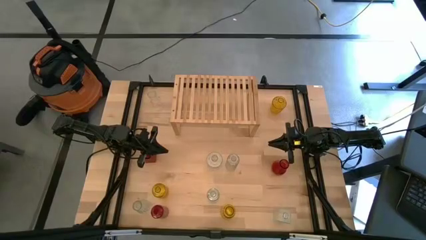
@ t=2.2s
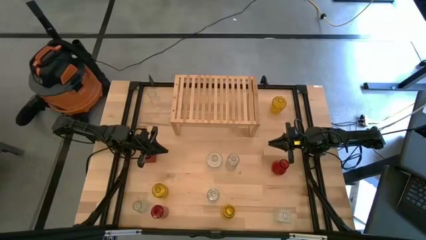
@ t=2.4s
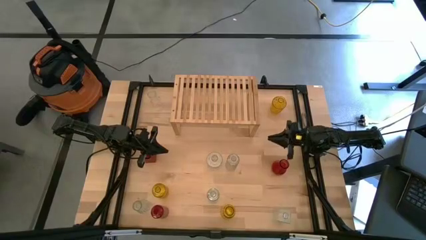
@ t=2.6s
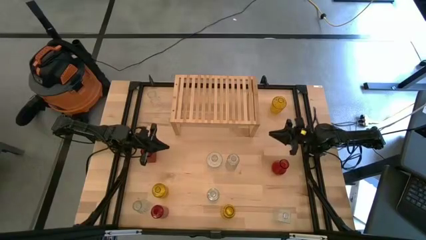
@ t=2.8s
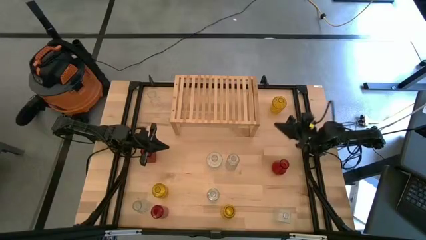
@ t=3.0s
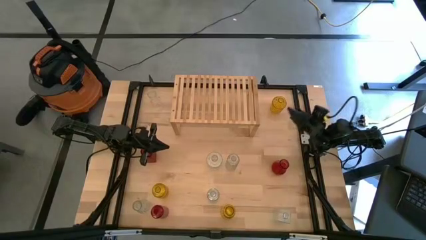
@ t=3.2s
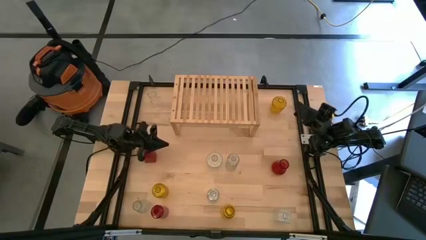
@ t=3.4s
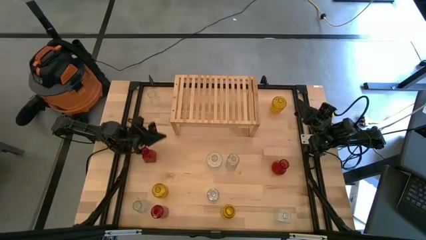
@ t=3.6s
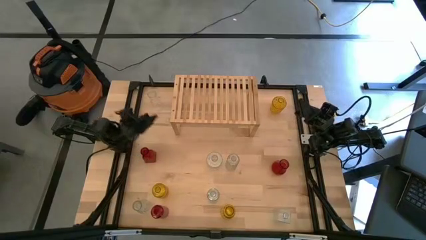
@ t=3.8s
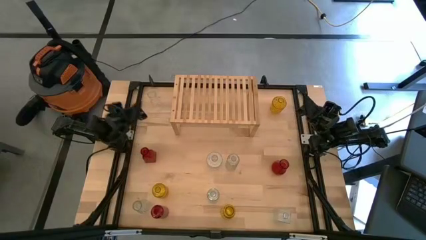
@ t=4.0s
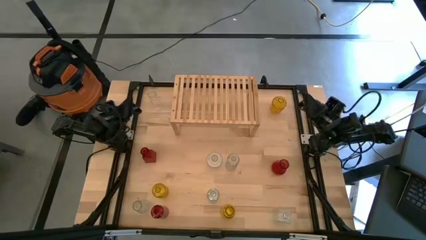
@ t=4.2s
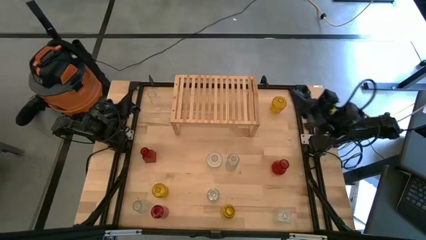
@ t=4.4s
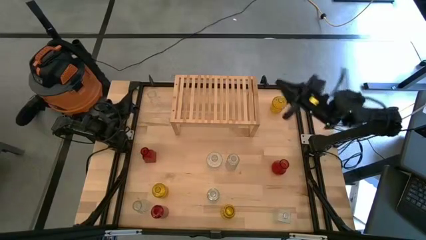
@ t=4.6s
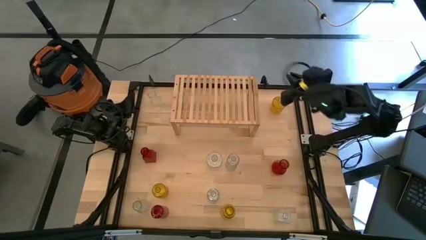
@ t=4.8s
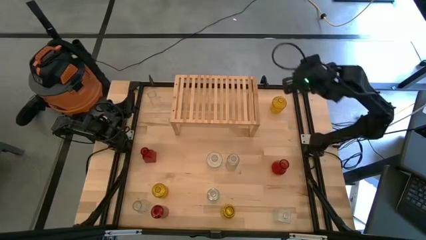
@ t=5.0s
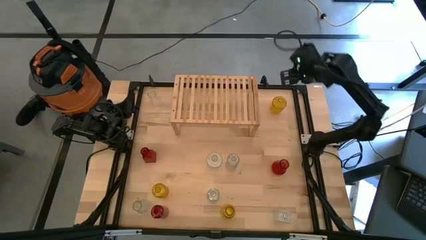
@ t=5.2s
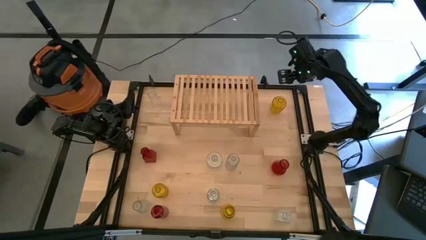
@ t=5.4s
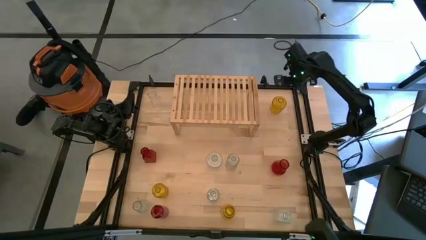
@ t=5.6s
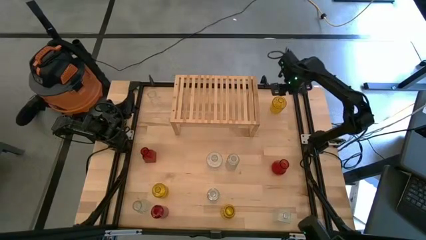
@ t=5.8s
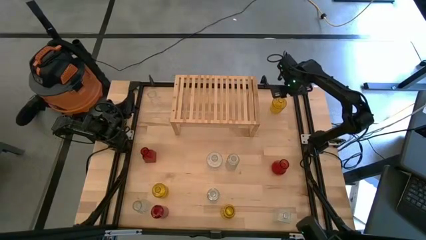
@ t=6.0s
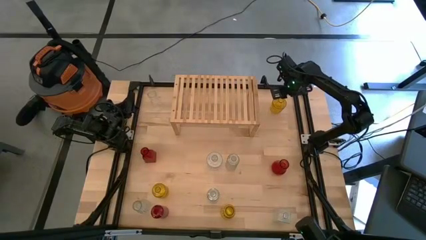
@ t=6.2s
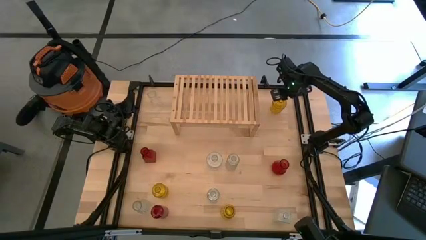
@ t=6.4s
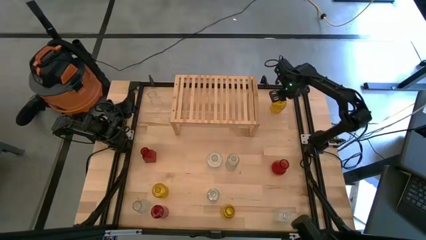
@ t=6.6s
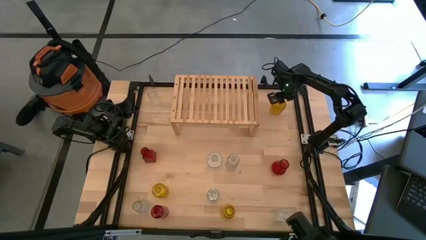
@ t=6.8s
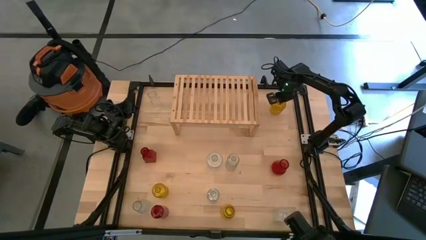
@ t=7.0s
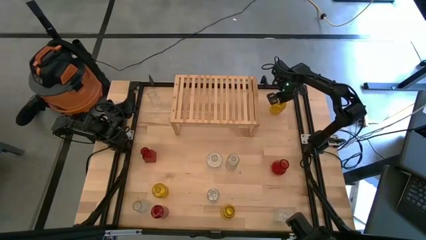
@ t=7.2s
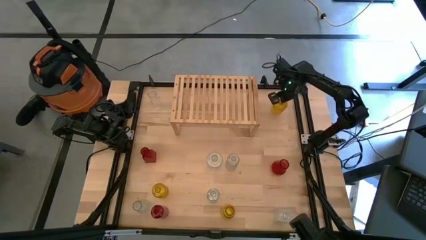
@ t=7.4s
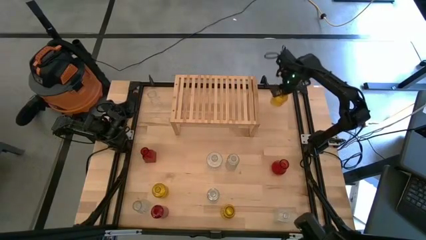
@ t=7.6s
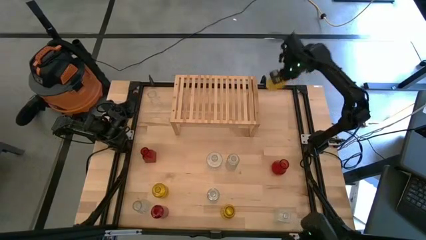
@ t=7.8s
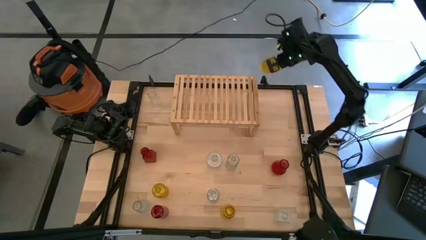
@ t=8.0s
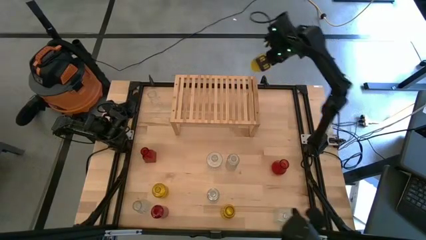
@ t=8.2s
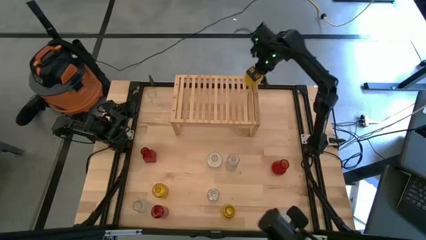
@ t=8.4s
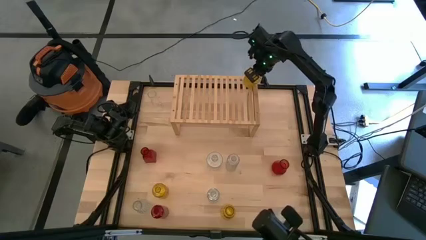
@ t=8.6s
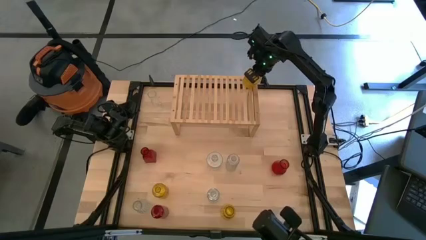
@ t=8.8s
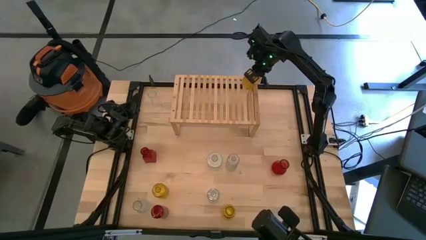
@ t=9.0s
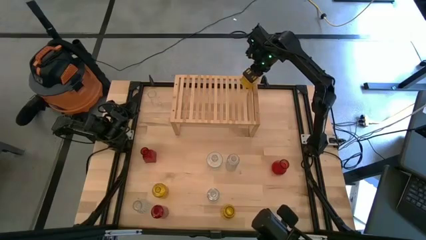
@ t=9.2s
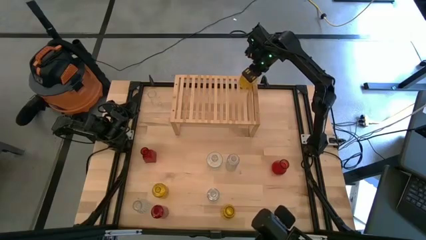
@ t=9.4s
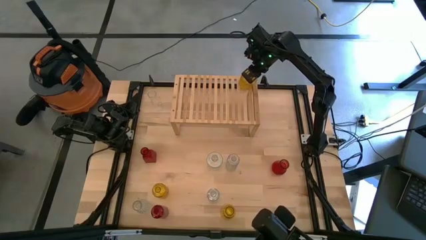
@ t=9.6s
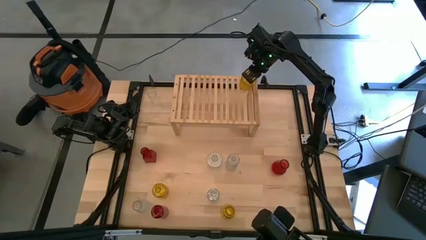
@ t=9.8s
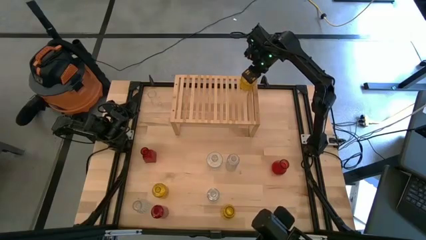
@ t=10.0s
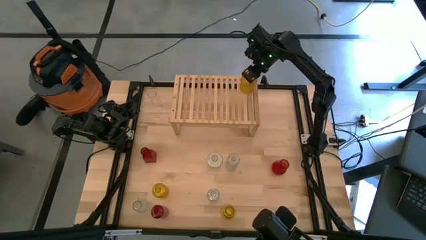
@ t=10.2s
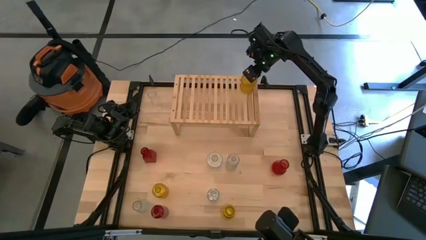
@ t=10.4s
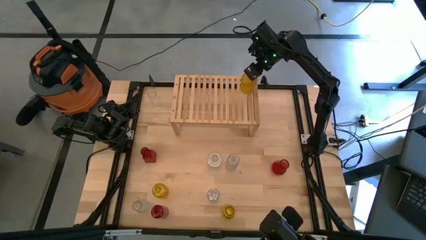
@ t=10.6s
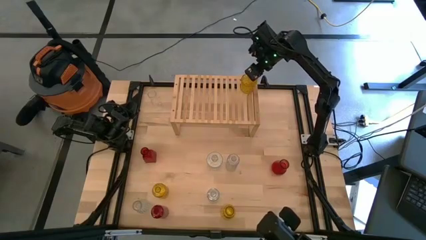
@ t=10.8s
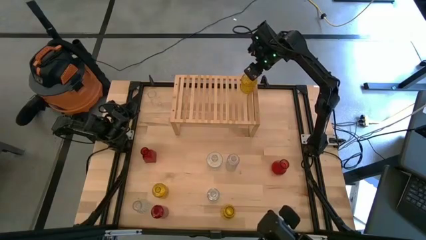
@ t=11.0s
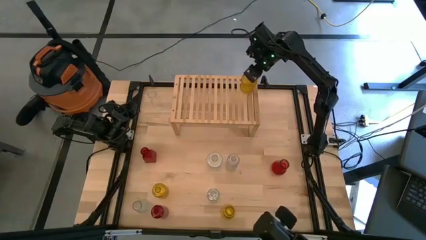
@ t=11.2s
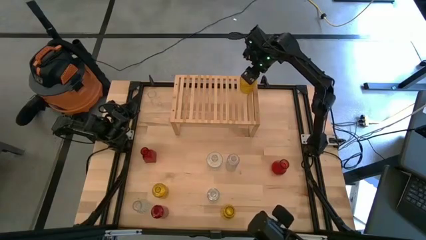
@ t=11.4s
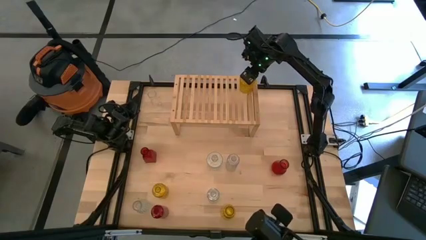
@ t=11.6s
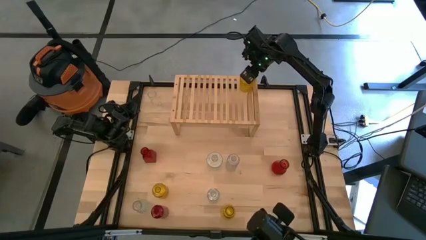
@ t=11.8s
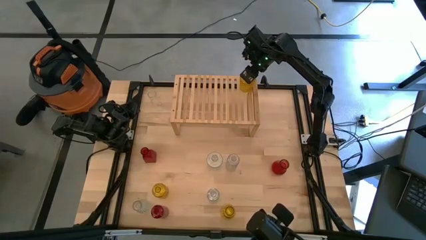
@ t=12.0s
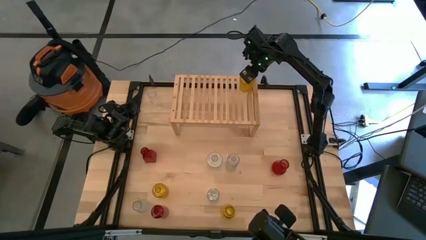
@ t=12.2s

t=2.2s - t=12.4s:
Task: sort vases onto shelf
Put the yellow vase on the shelf

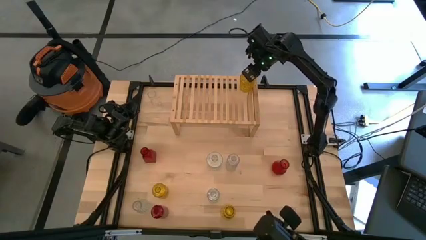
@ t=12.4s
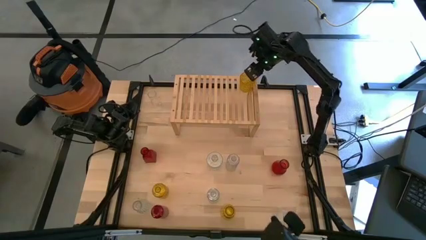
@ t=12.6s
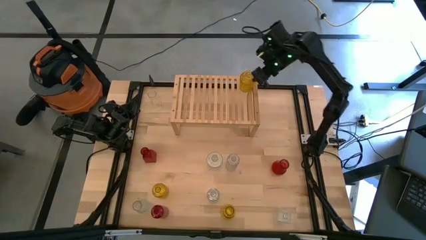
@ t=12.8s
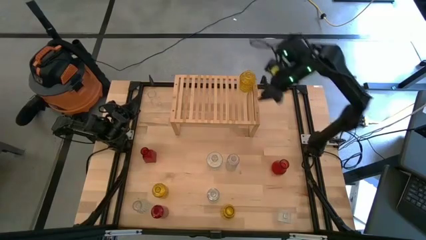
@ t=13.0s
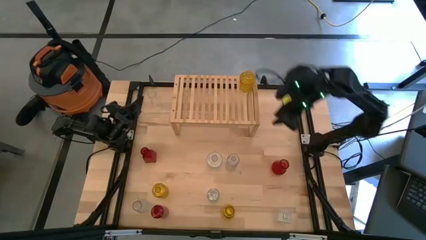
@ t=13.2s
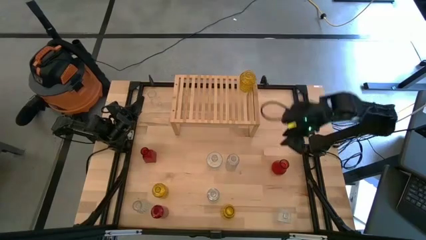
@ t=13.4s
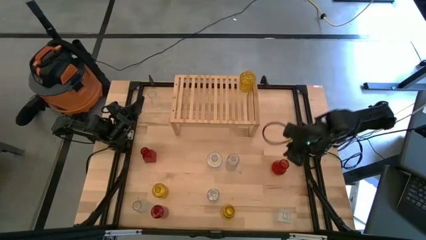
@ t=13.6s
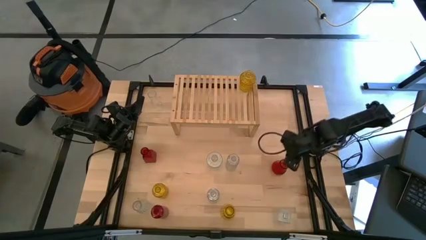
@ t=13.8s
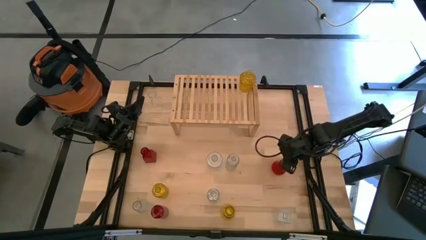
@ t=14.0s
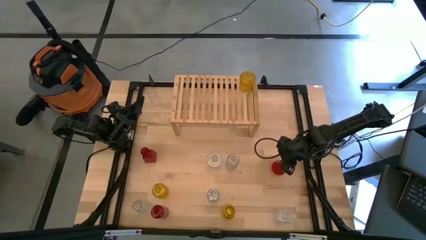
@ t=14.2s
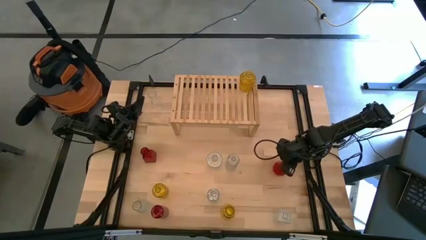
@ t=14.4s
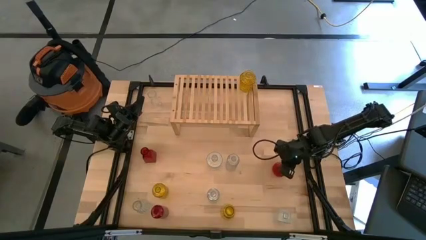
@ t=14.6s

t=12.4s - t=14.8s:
Put the red vase on the shelf

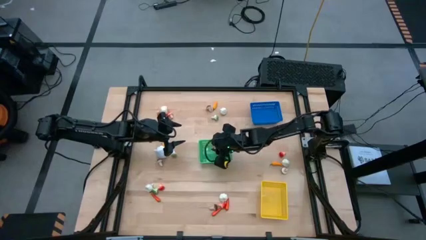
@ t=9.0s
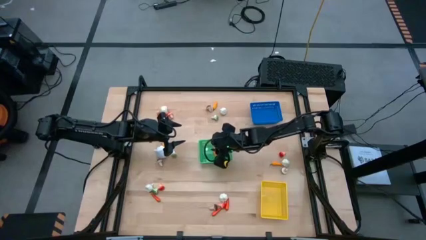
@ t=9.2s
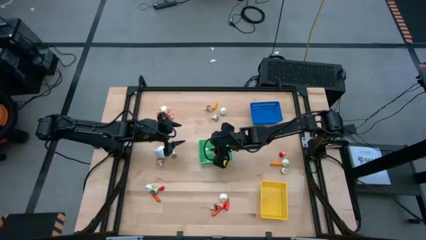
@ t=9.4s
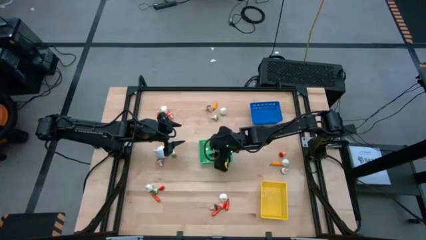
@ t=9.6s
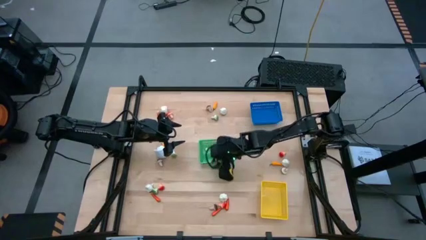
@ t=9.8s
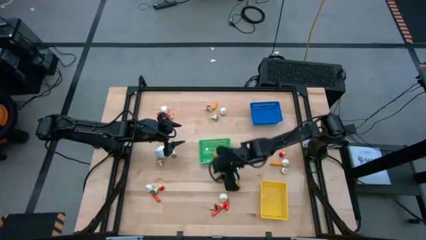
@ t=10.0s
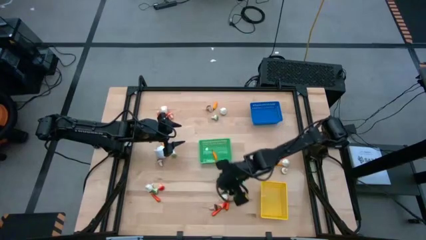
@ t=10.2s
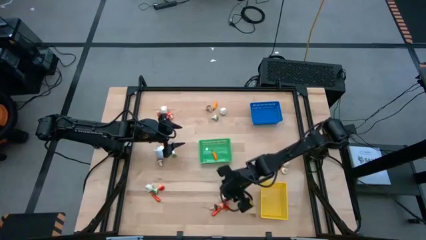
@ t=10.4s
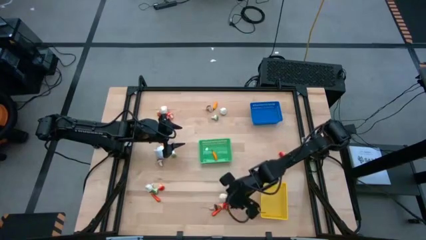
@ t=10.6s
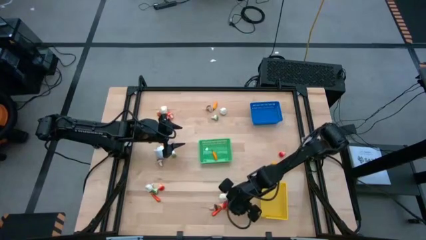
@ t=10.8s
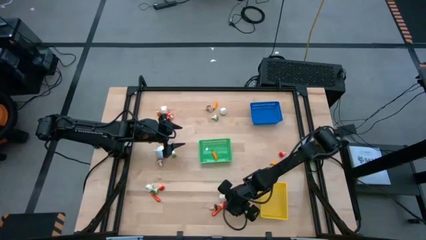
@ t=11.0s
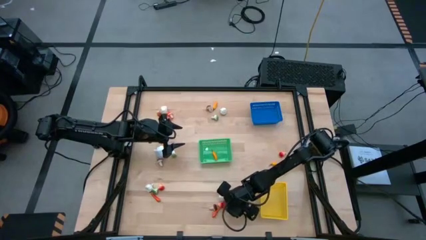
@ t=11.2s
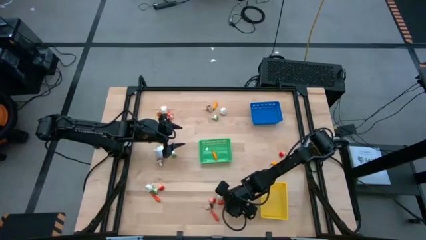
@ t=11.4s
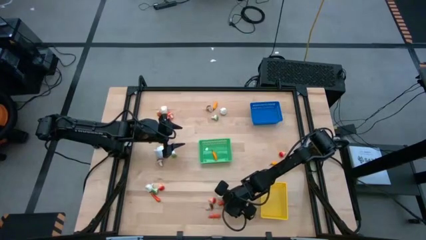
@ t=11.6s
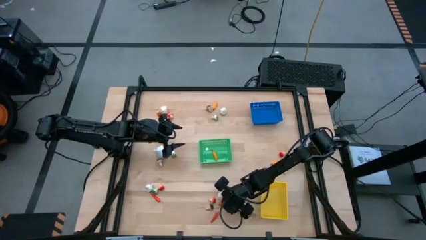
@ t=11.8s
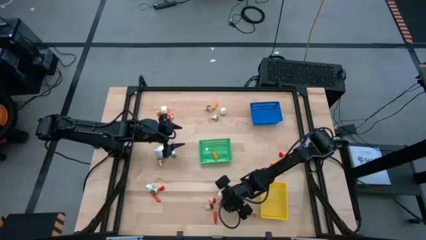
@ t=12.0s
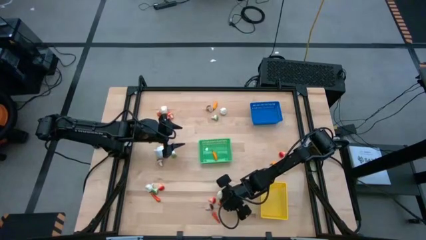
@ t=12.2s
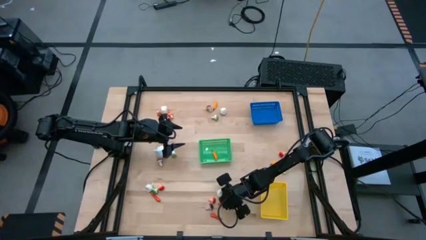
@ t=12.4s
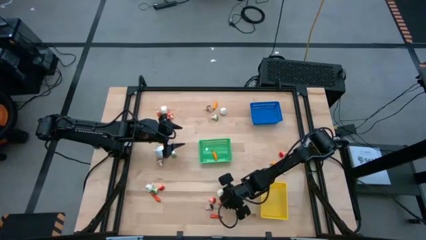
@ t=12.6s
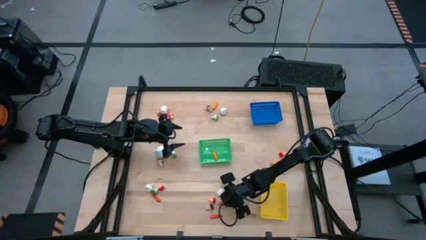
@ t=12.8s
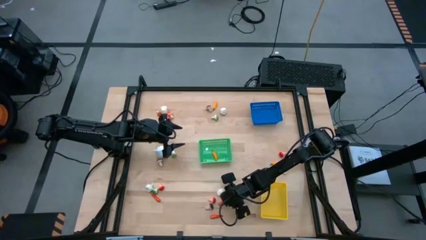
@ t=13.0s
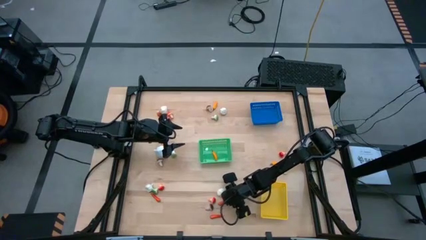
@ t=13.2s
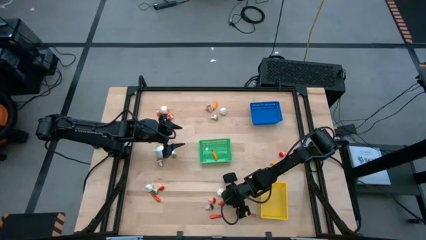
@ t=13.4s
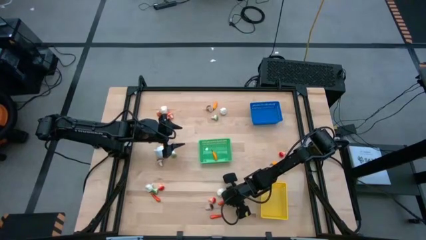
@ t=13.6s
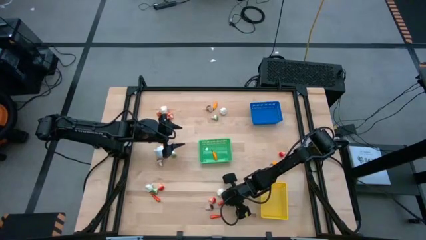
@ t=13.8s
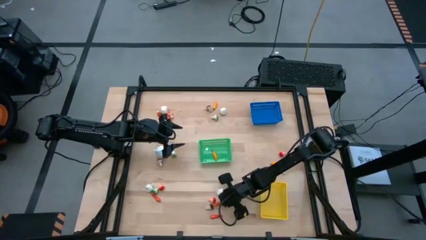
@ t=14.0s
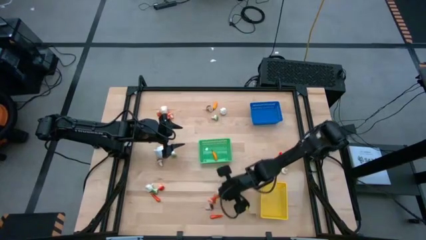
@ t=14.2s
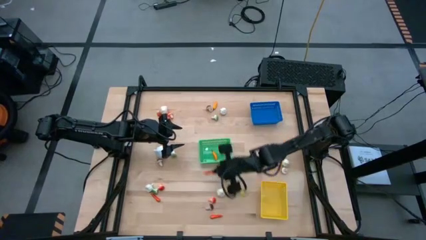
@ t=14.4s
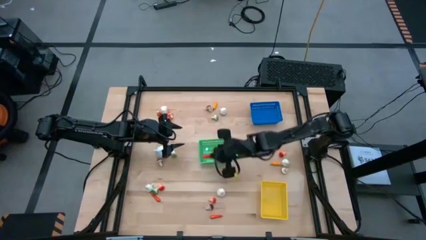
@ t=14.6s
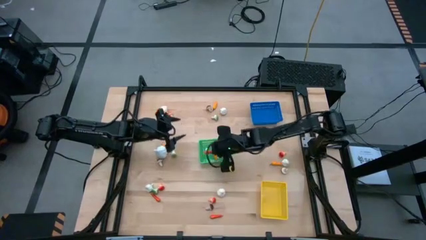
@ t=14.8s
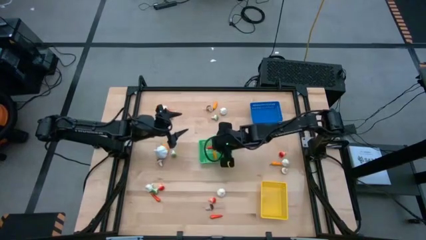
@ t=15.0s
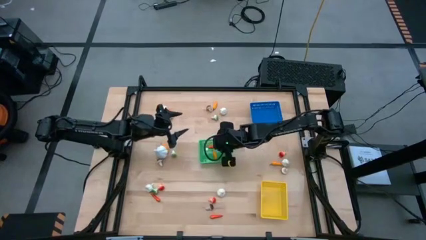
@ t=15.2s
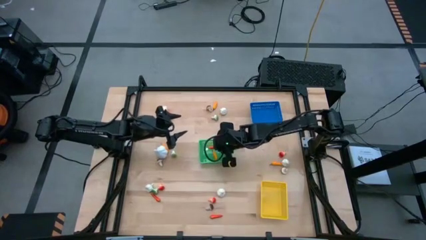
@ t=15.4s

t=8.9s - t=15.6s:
Task: Sort produce into baskets
Put the orange chili pepper into the green bin
